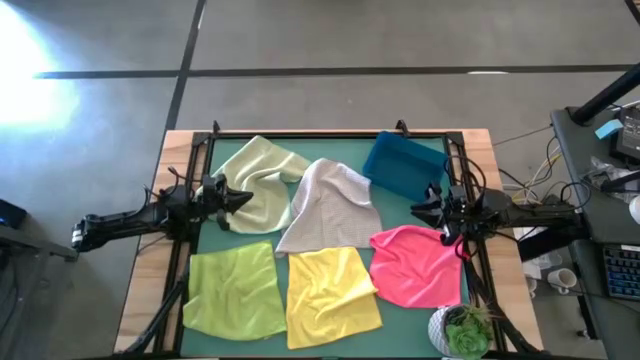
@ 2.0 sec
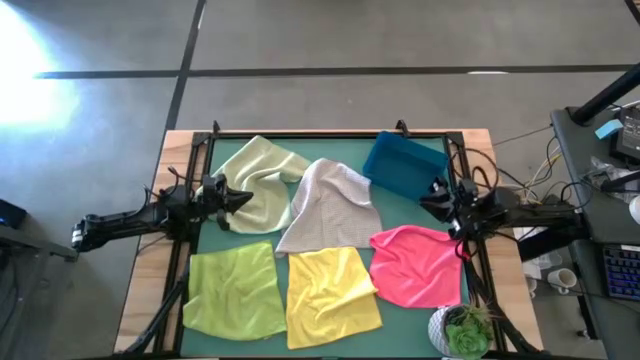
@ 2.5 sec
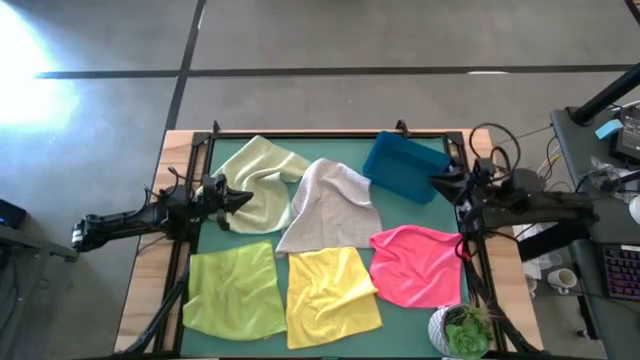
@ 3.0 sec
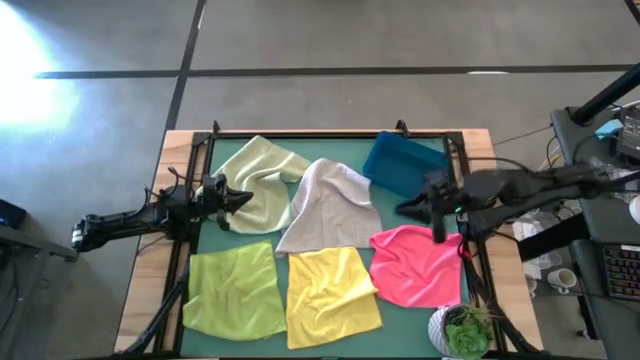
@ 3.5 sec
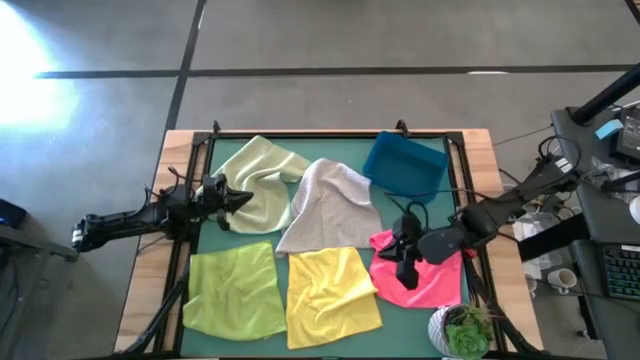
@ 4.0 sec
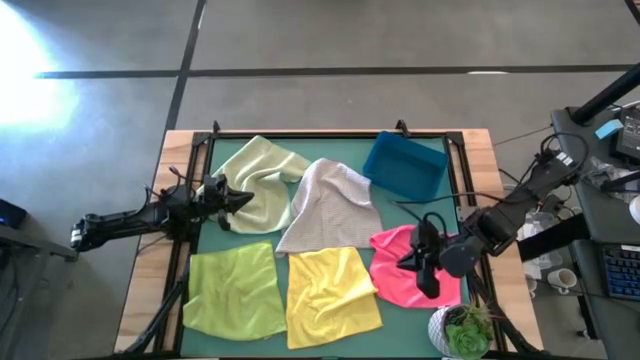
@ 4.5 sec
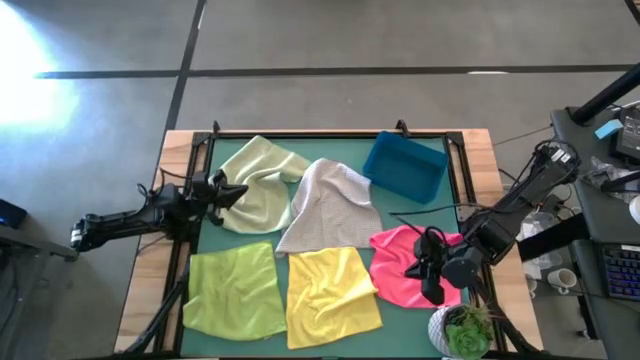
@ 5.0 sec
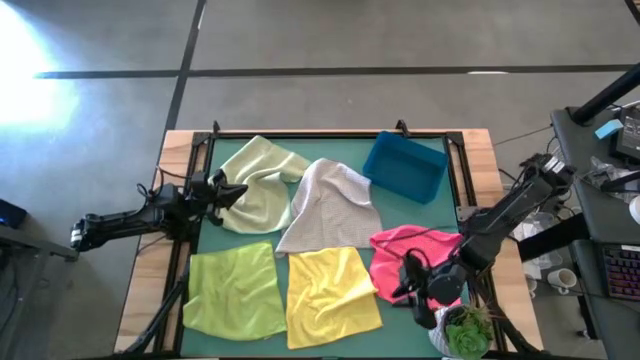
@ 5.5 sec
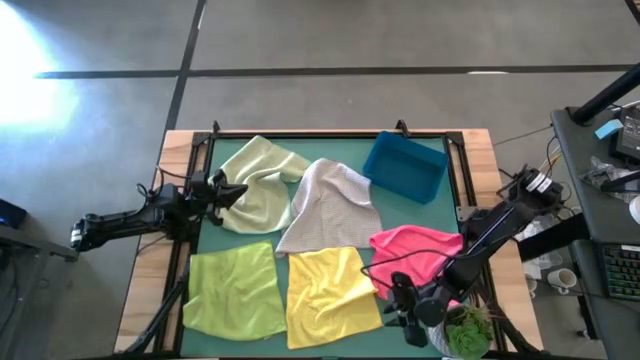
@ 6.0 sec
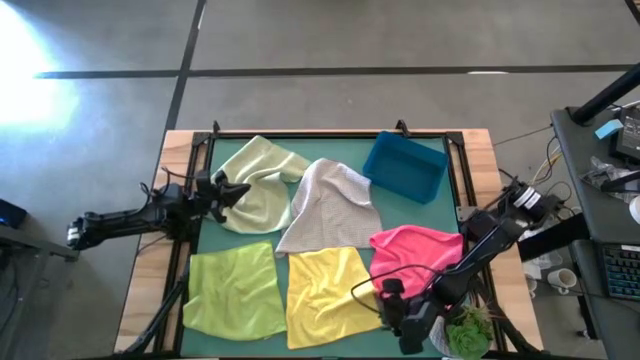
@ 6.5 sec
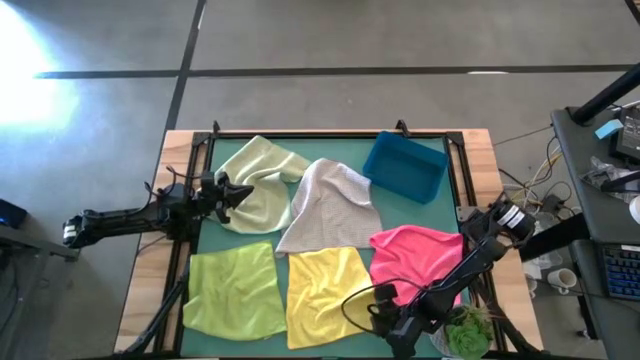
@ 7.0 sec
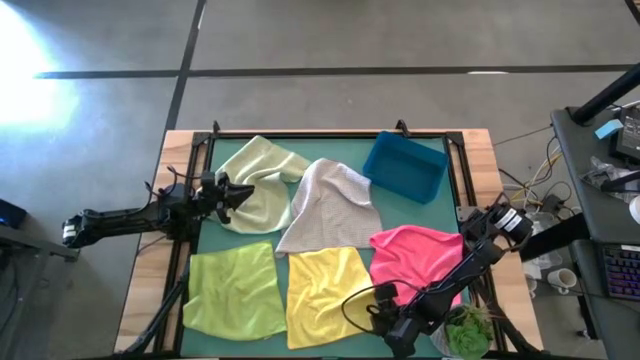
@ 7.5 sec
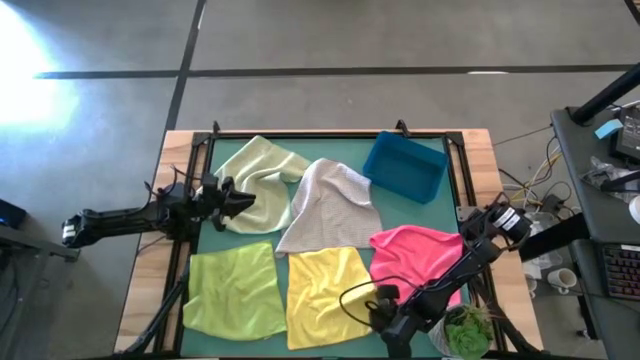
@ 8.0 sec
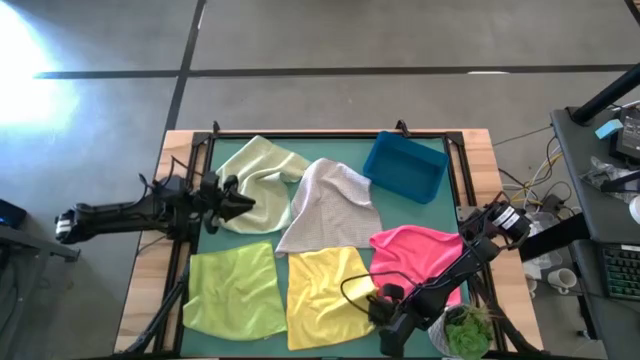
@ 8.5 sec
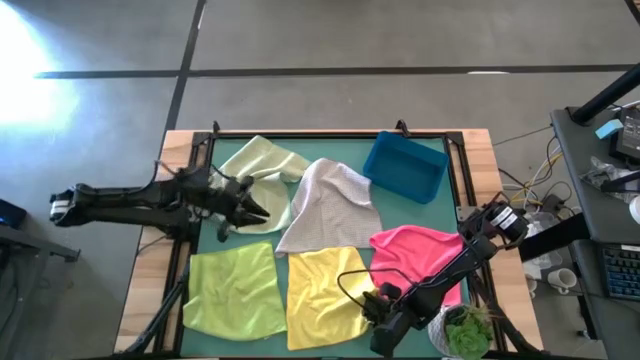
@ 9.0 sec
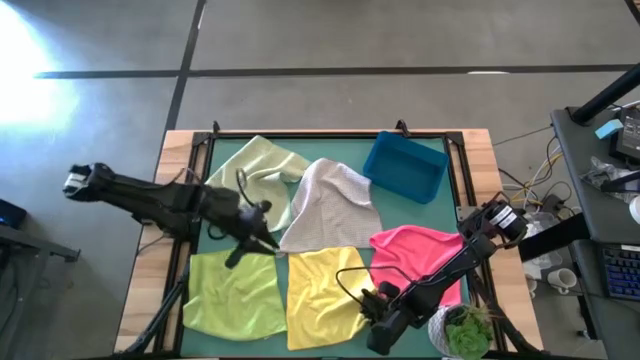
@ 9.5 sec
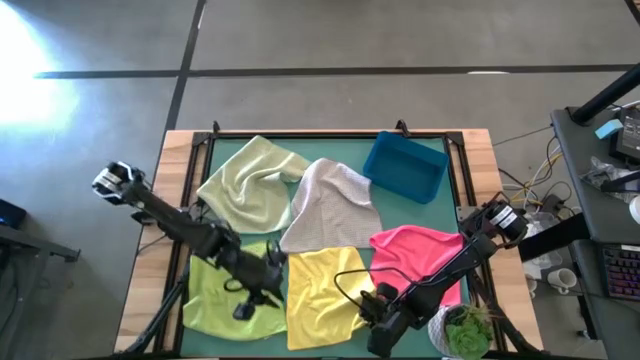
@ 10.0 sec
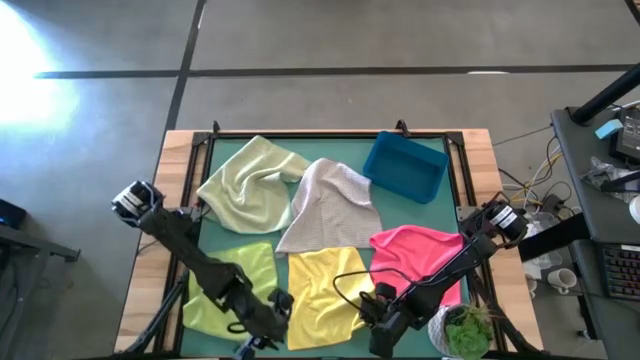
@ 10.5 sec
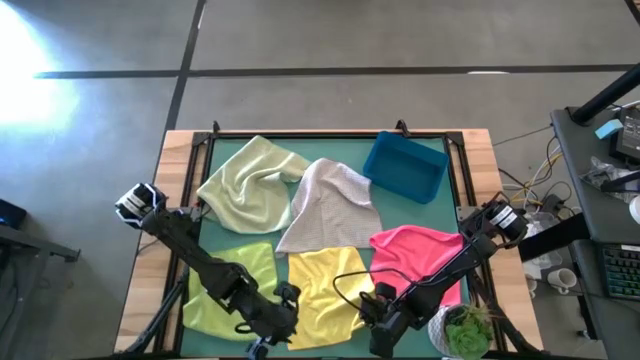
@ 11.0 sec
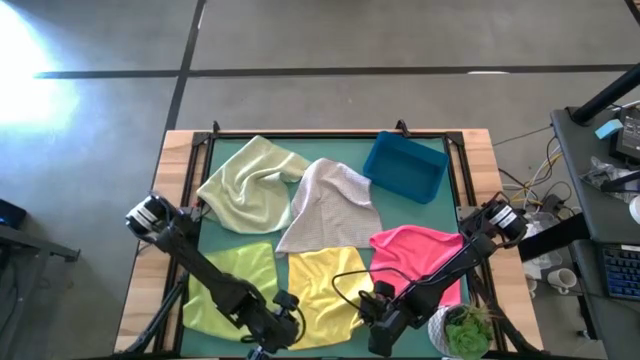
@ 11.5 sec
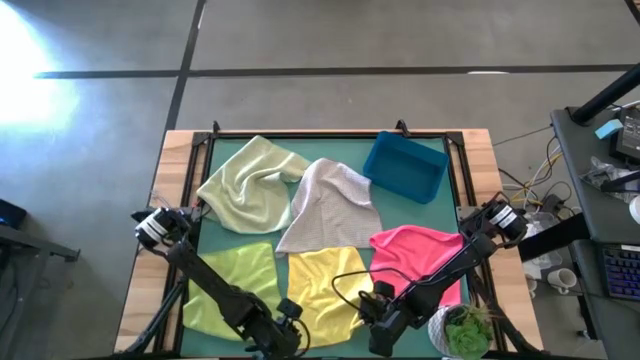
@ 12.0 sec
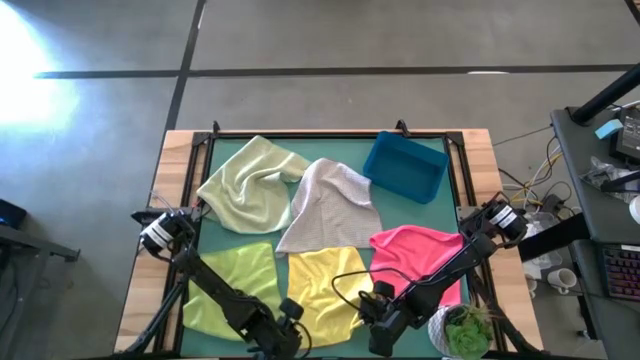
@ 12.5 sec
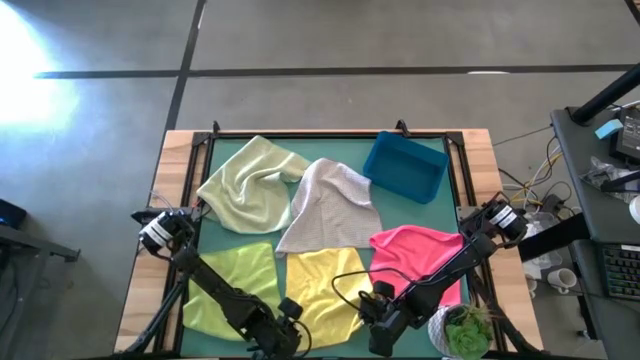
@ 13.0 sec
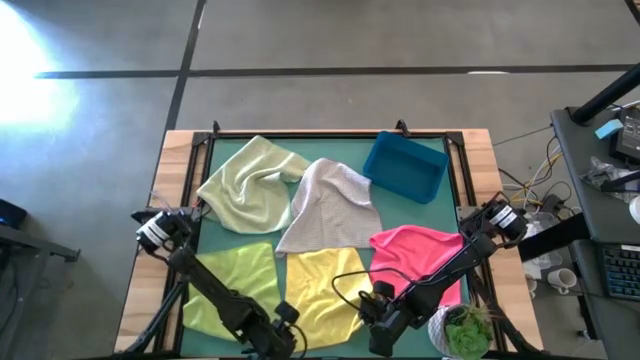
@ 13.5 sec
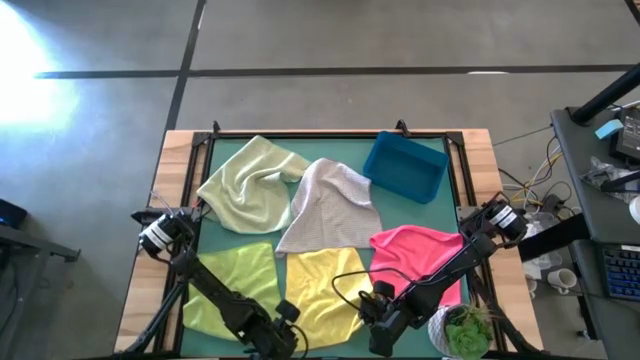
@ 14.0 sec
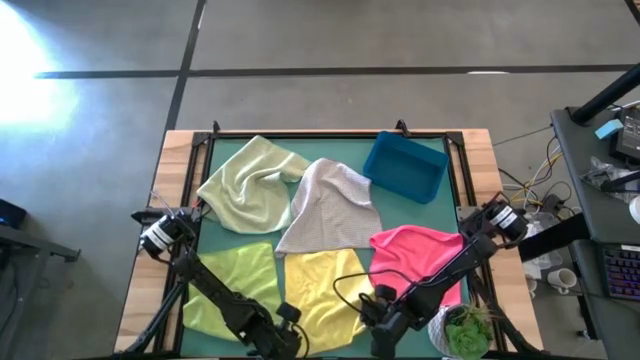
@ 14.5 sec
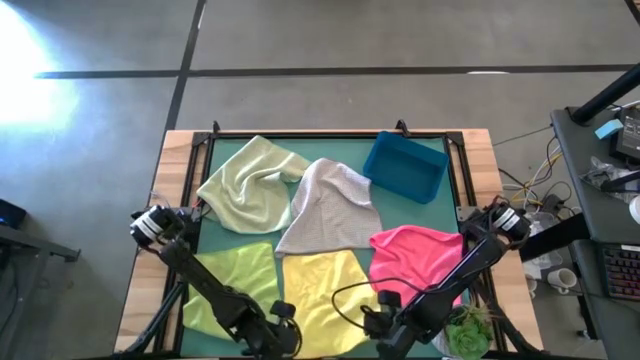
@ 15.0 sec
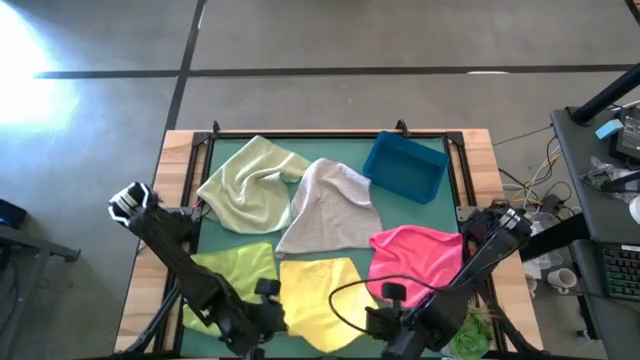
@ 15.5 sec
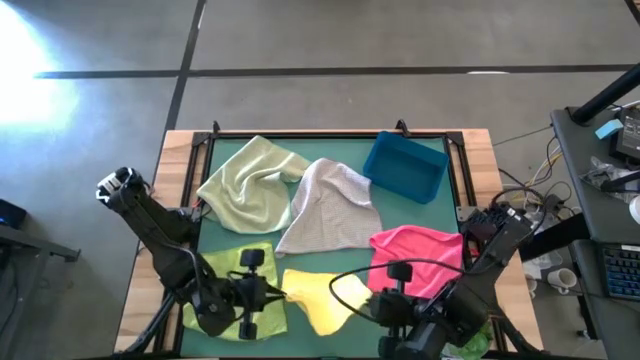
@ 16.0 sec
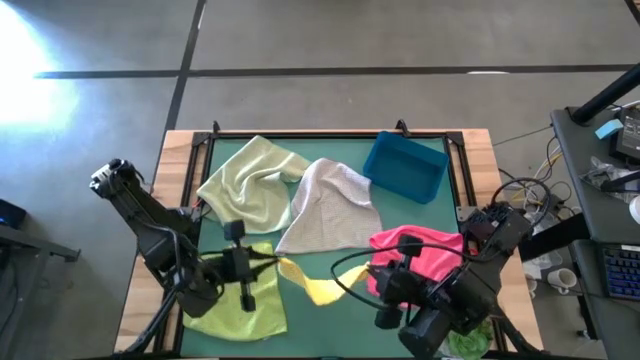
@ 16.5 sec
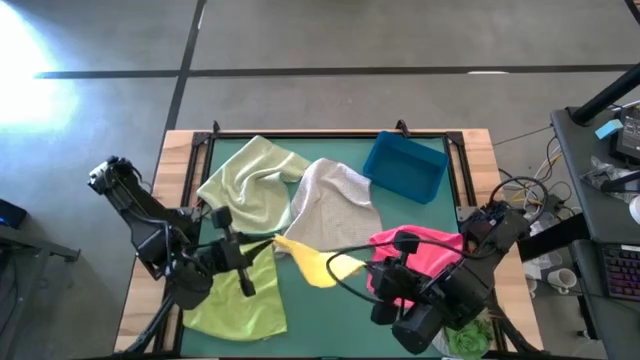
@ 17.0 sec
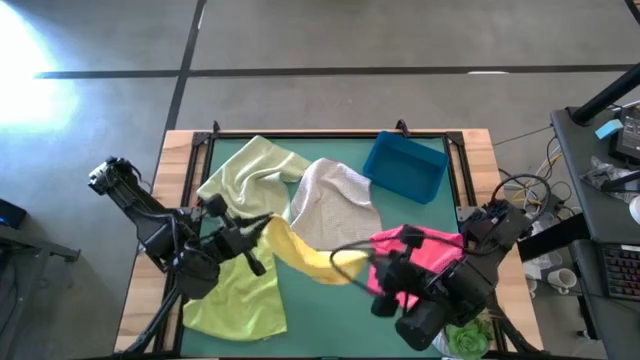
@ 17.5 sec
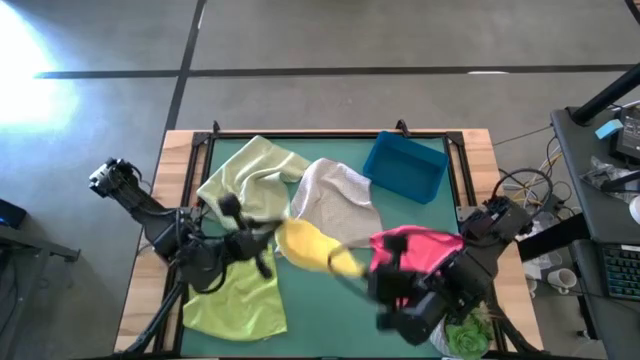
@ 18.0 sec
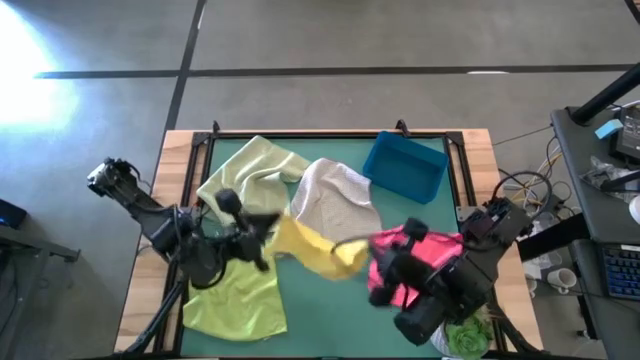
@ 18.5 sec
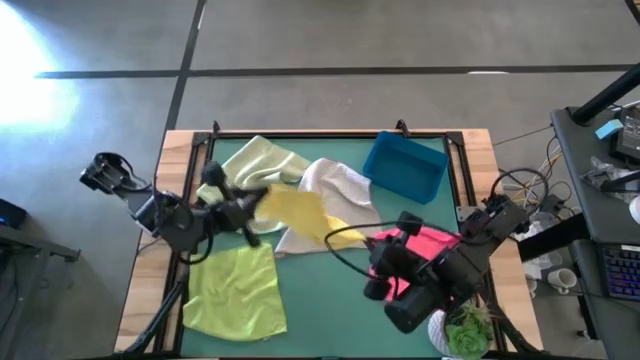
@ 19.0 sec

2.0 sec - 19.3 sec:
Task: Fold microfiber towels
Fold the yellow microfiber cloth
